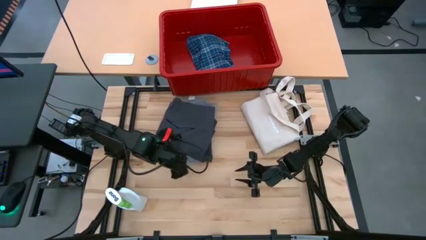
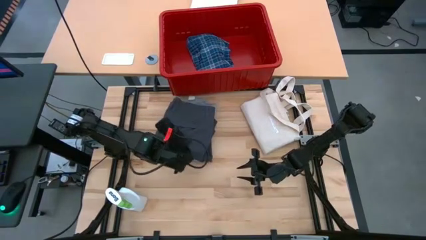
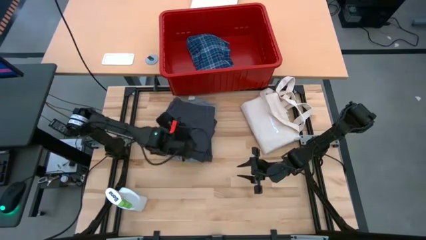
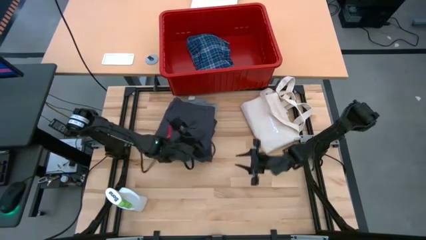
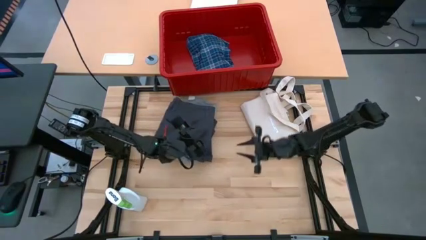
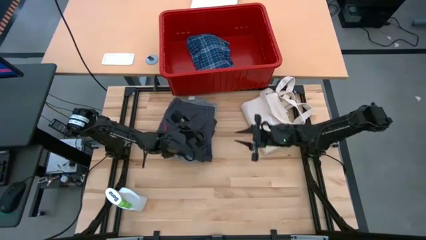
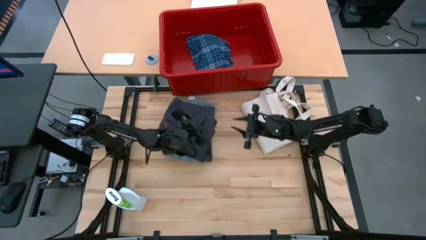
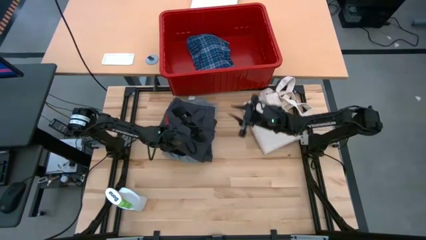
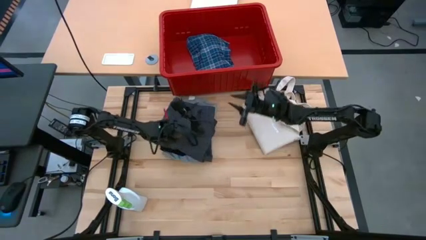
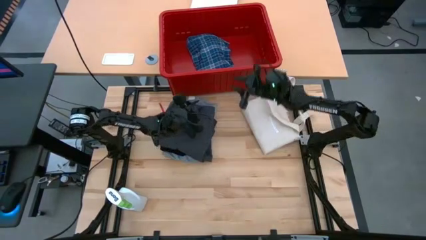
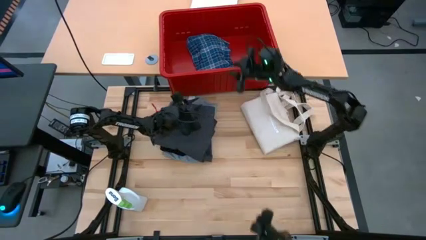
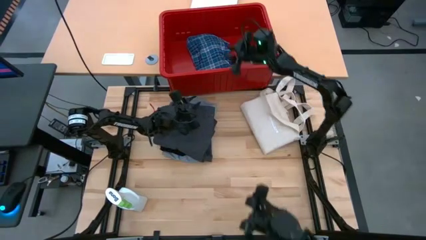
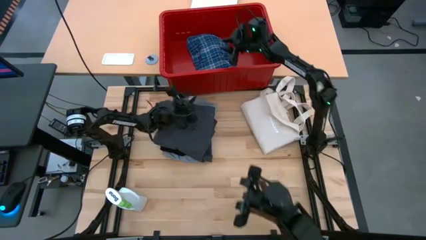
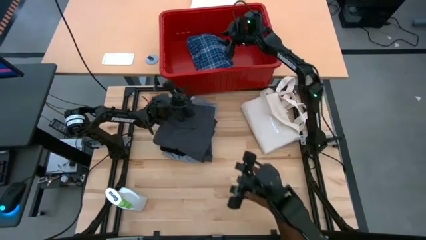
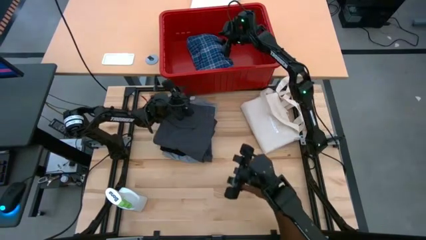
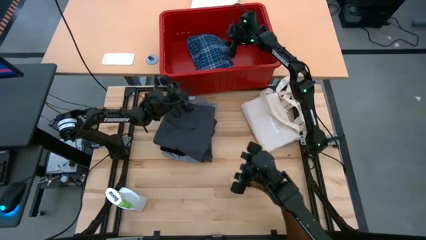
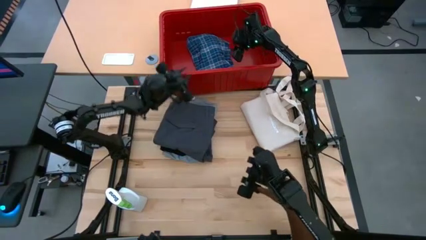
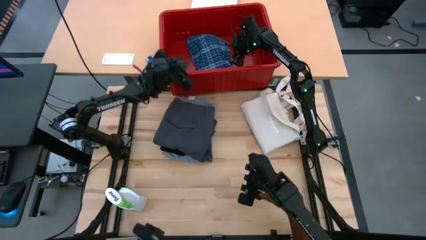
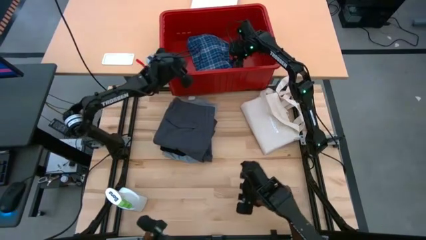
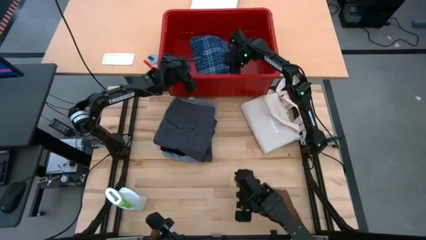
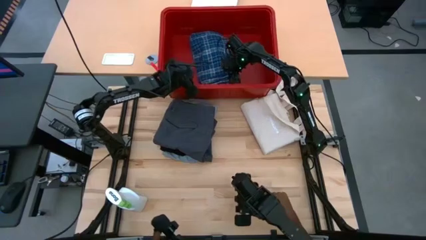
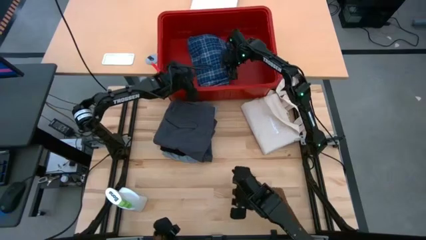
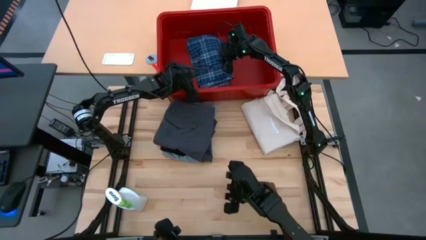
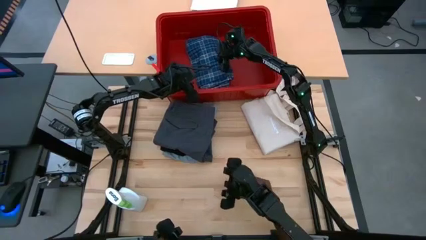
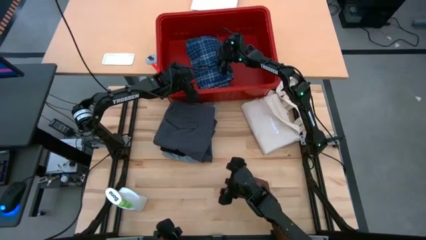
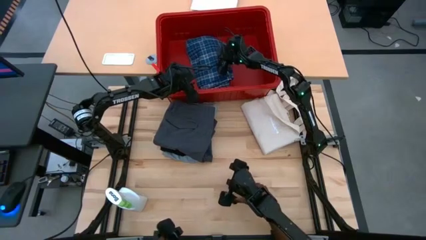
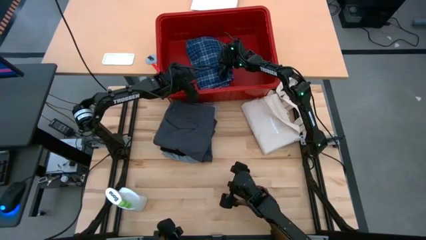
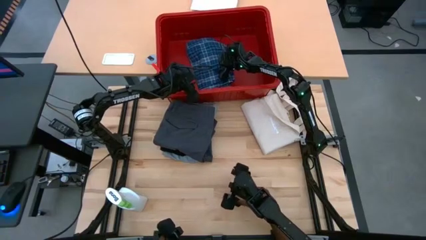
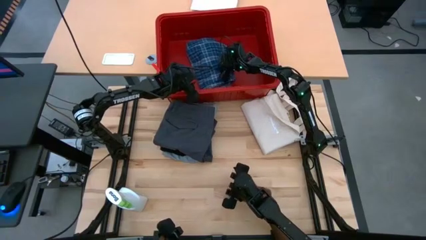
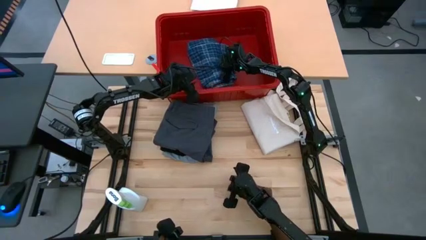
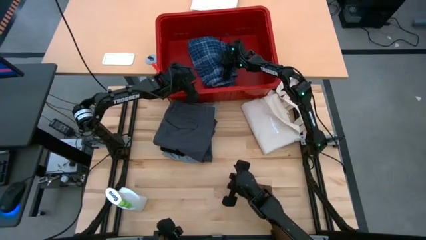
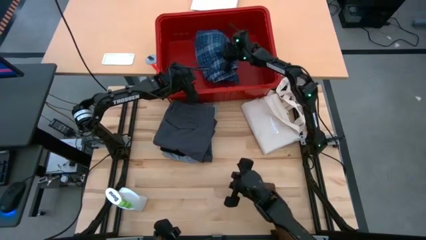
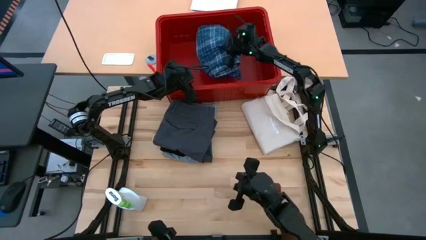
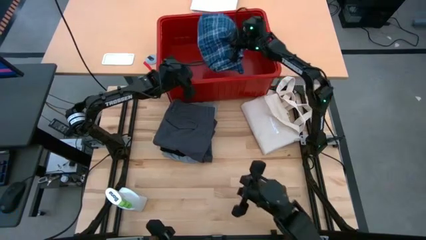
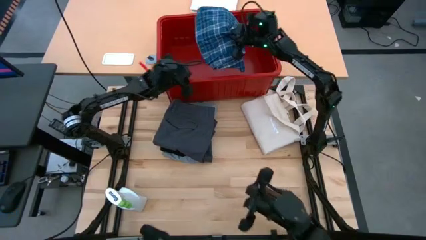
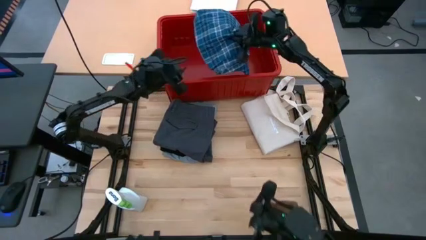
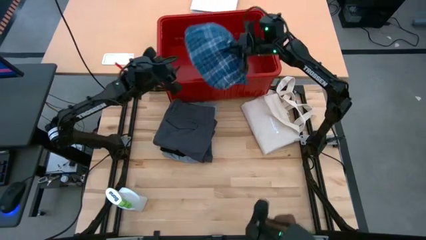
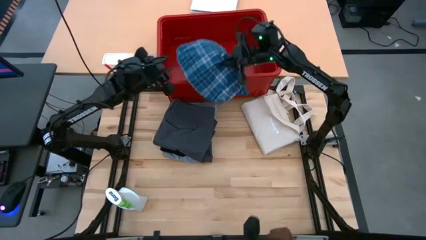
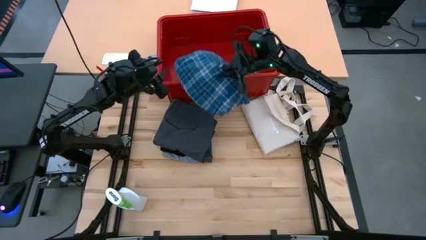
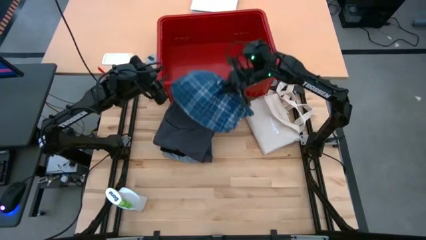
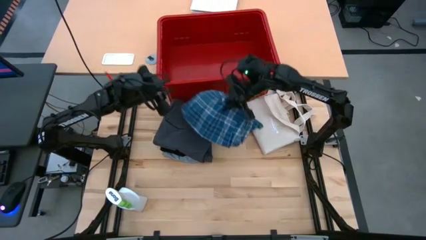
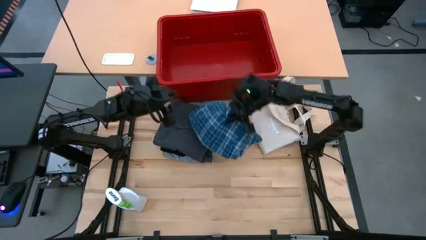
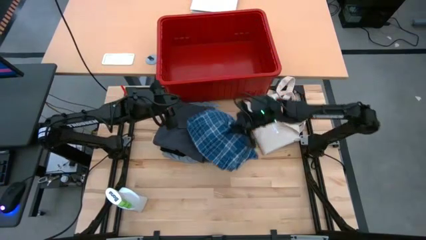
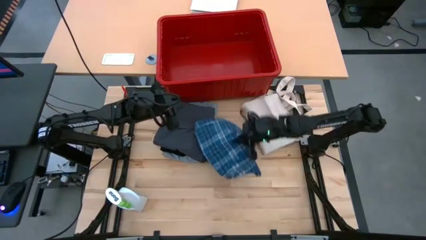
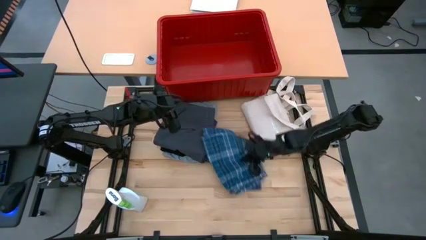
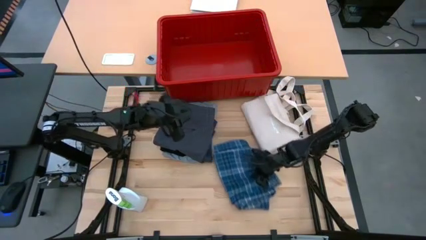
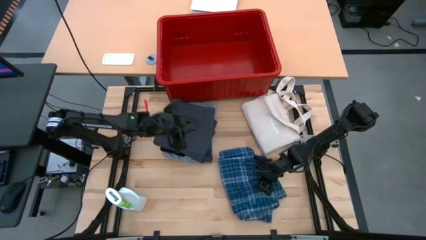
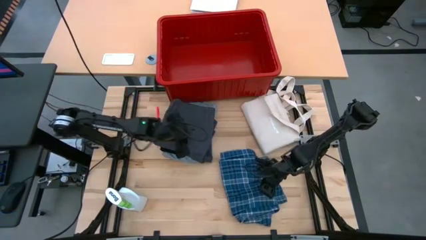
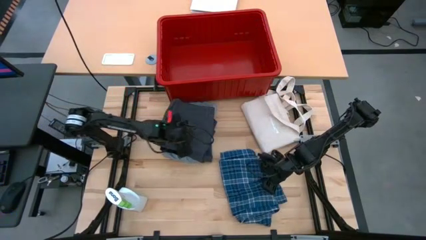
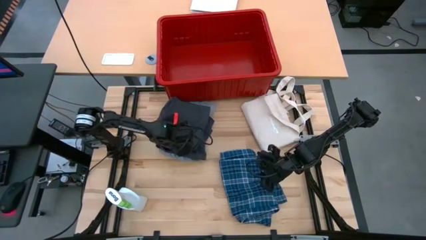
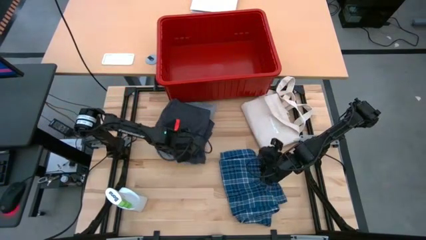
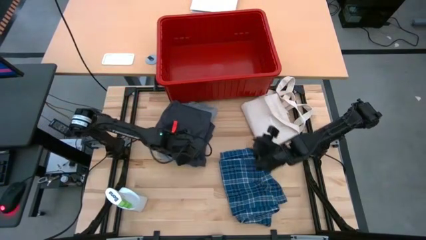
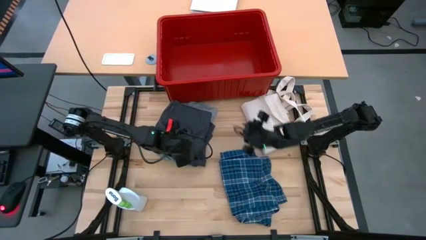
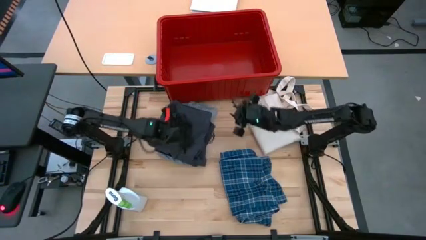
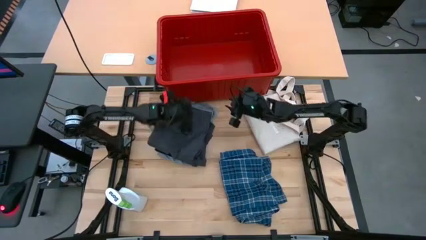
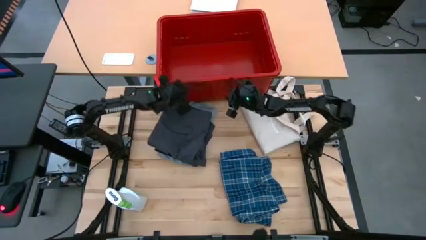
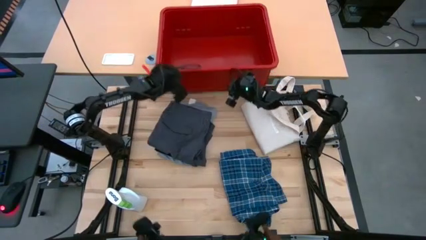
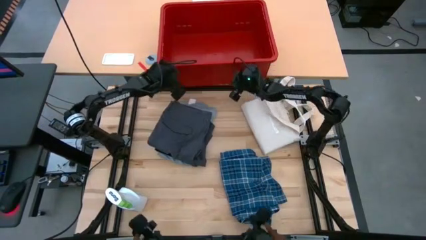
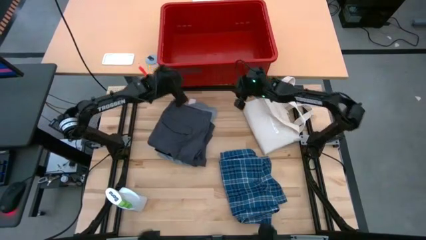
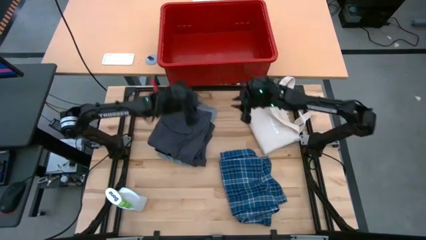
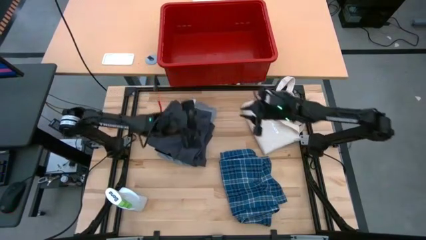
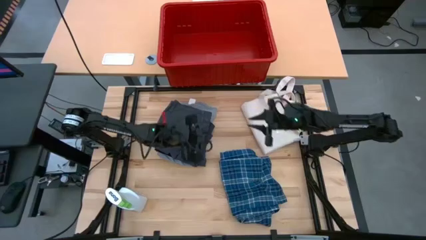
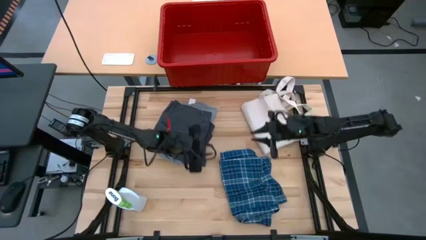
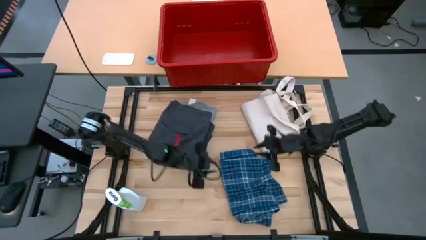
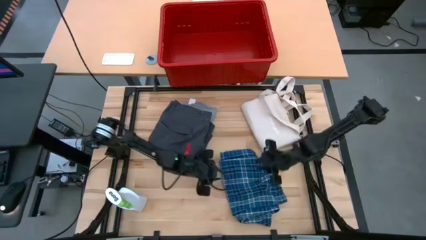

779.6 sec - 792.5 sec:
Task: Fold Laundry from Bin
Remove the blue short from the laundry organizer

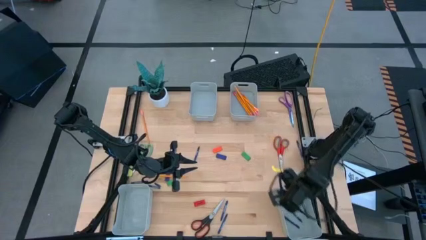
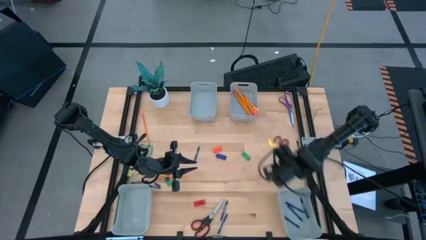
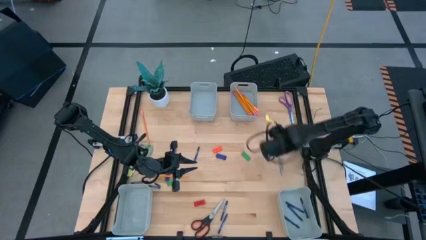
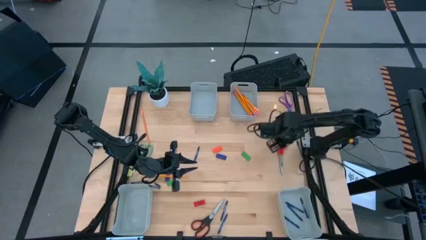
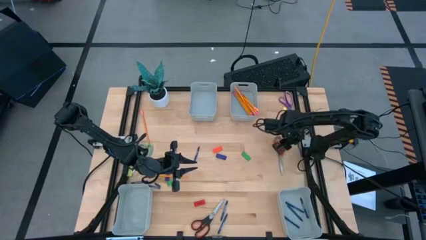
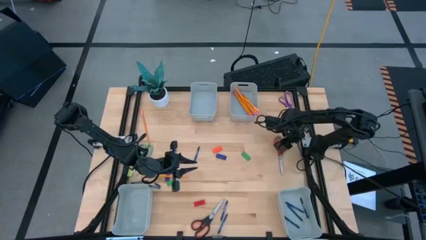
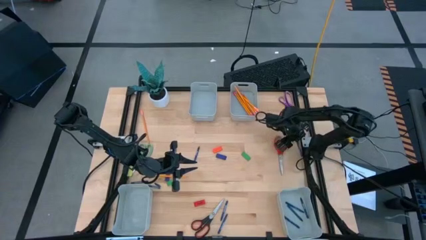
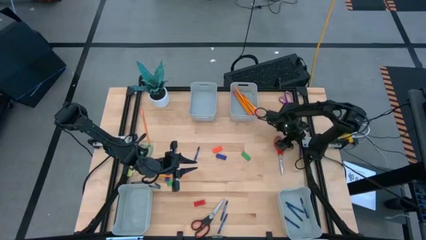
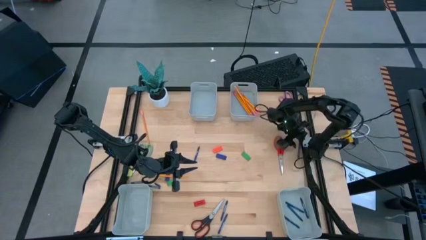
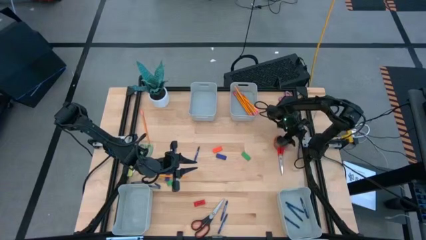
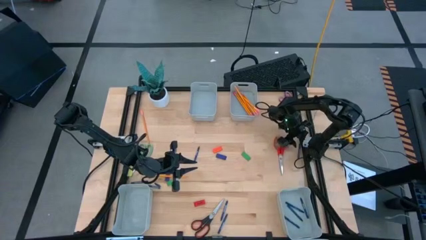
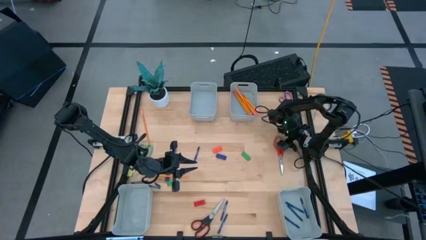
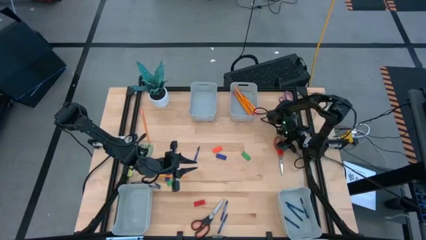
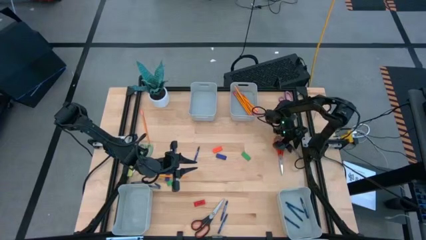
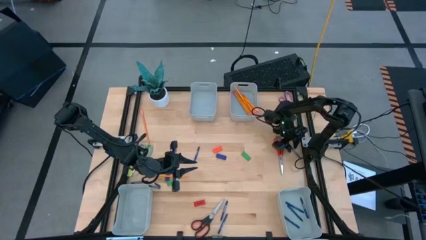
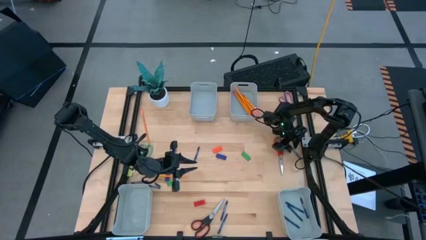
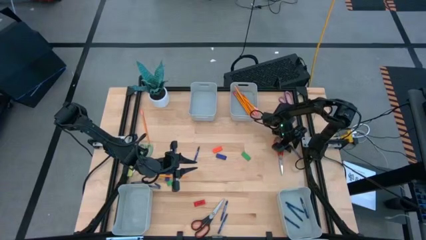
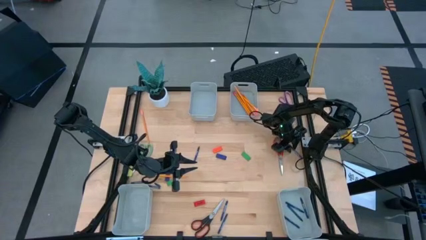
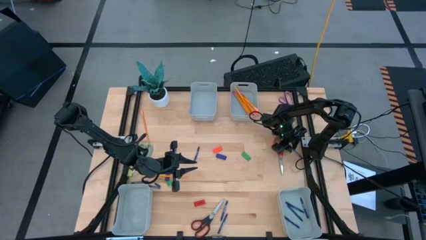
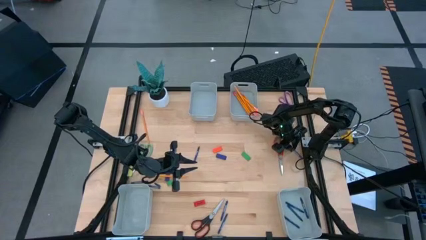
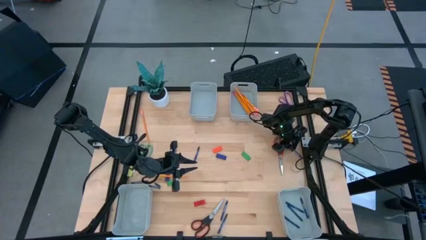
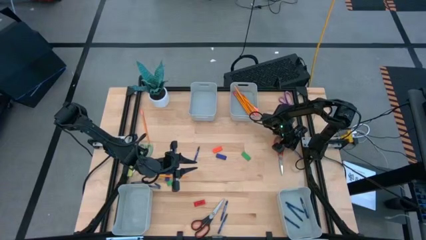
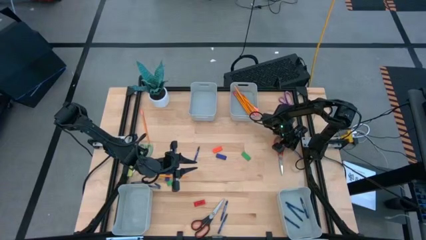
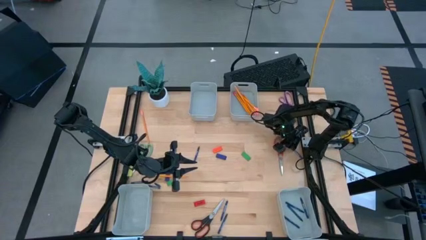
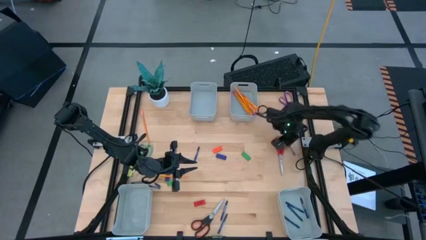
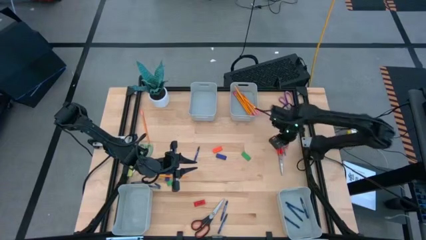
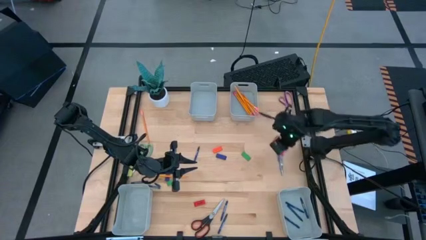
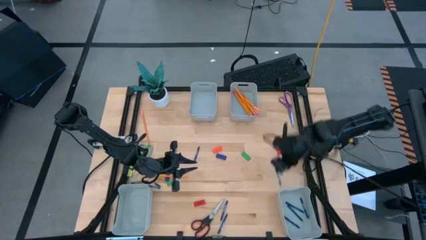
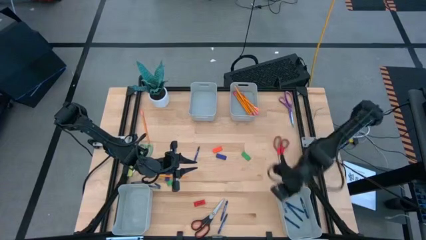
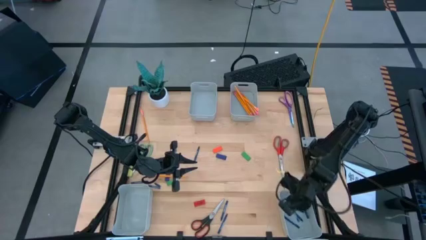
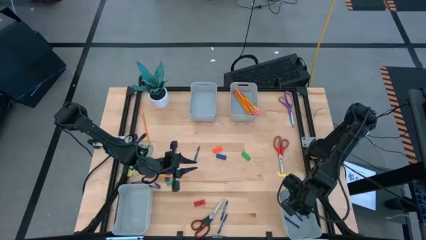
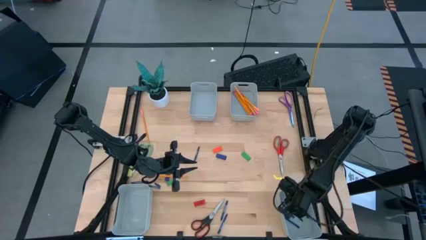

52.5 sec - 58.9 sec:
Task: Sort crayons/erasers/pens/pencils in bins
Put the blue crayon into the bottom right bin
